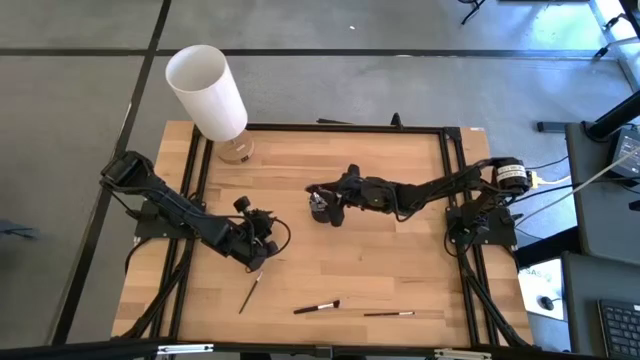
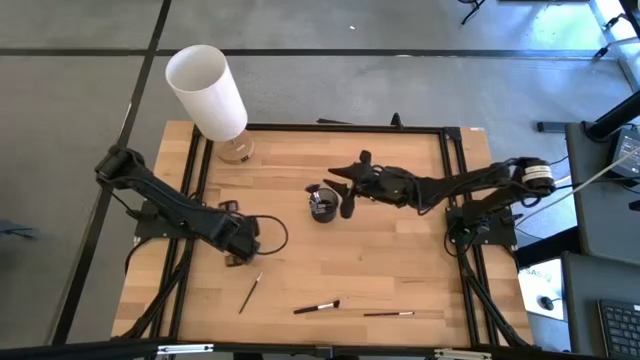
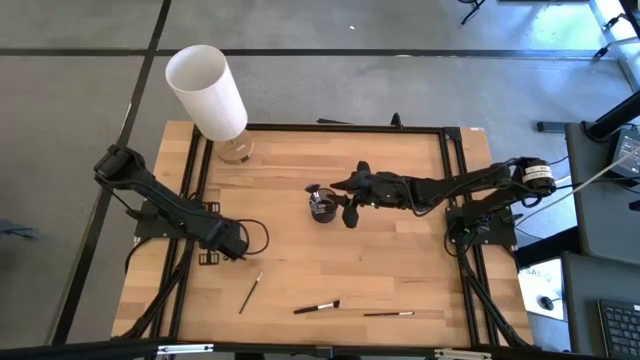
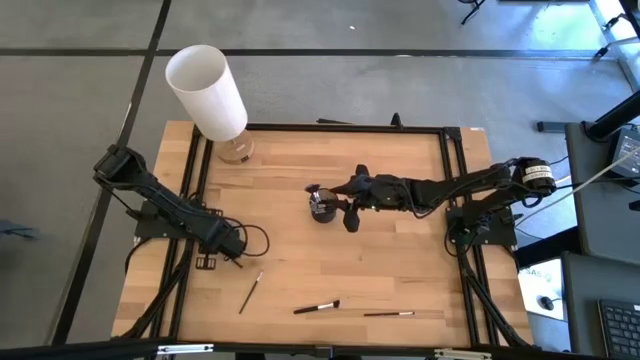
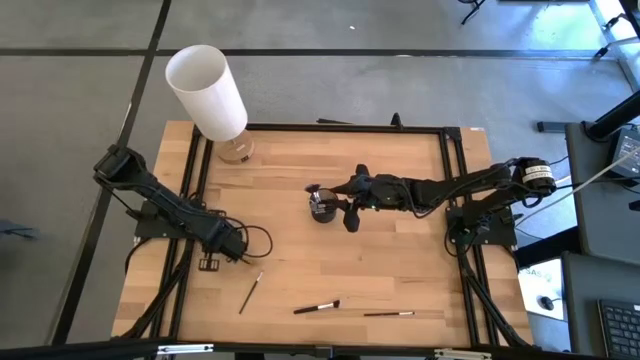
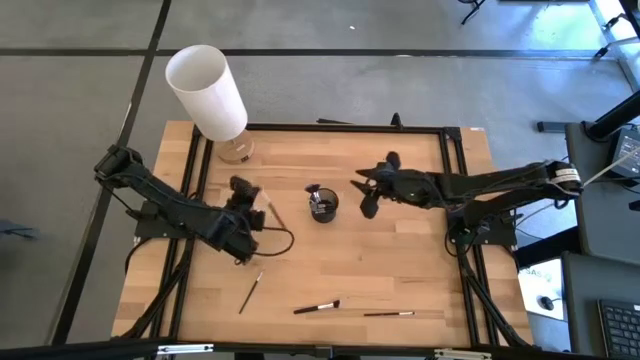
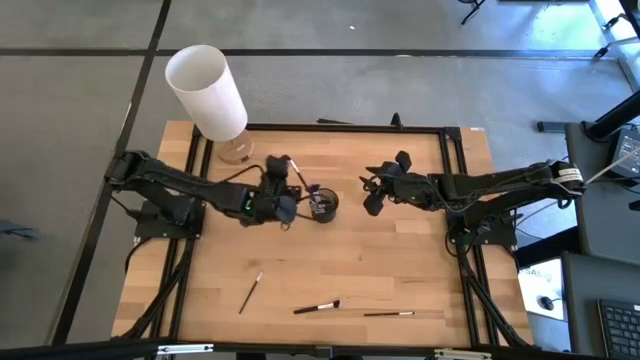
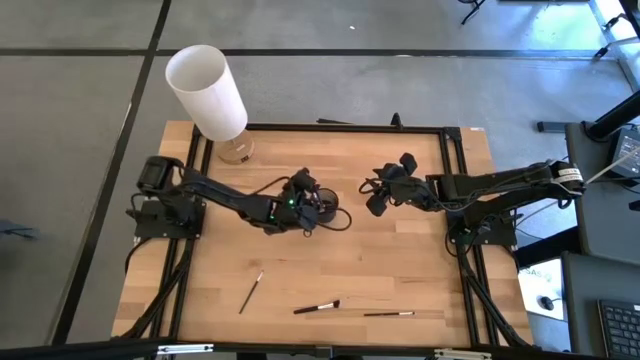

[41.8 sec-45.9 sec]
Task: Pick & Place Makeup Brushes
Put the eyeshadow brush into the makeup brush holder

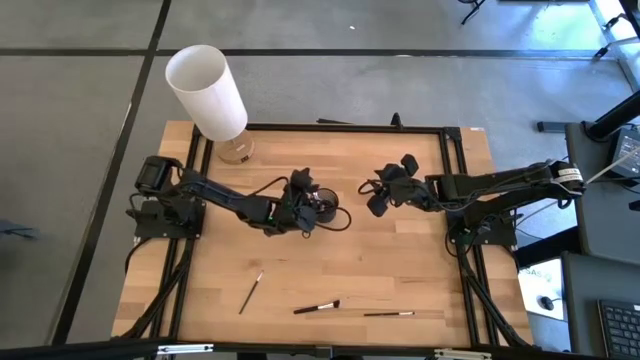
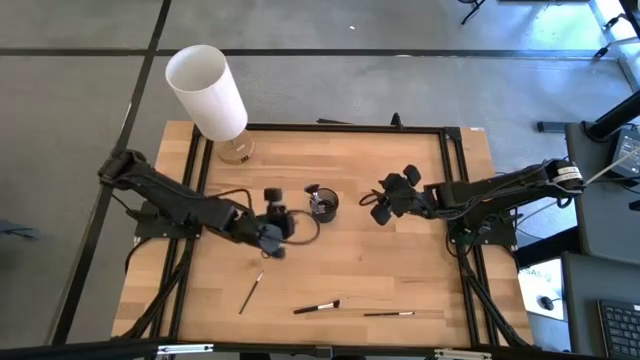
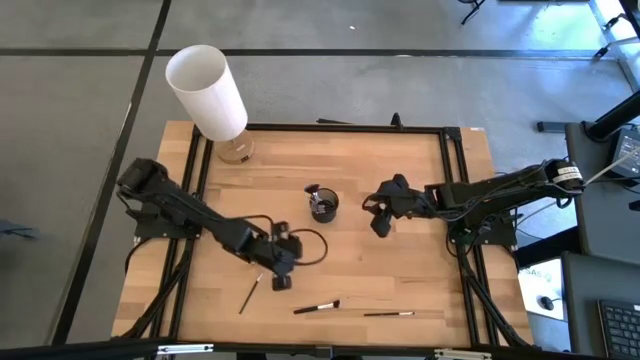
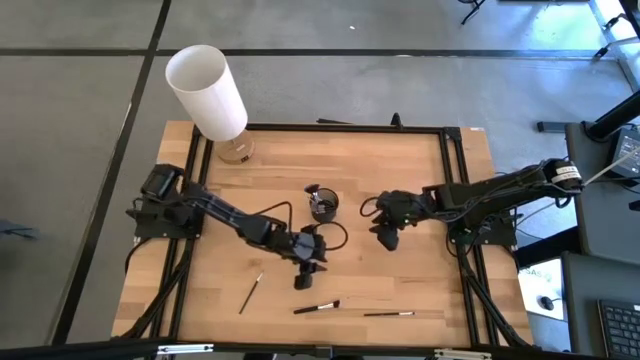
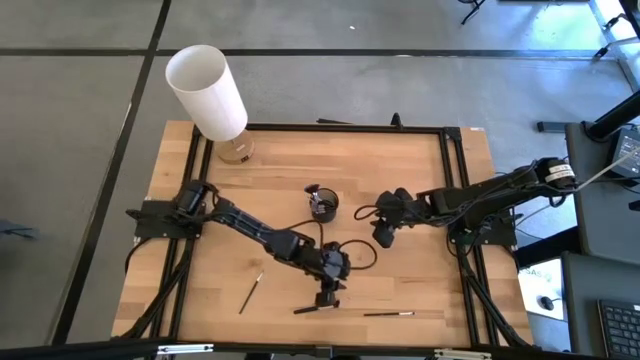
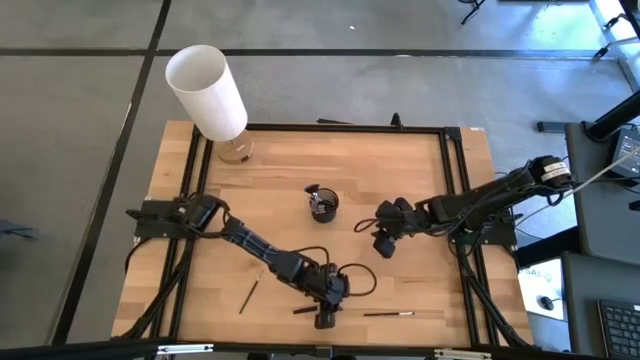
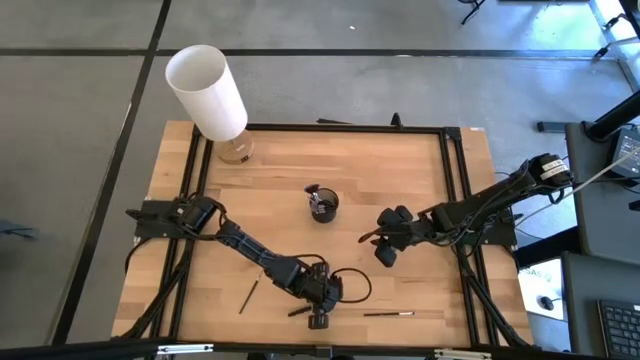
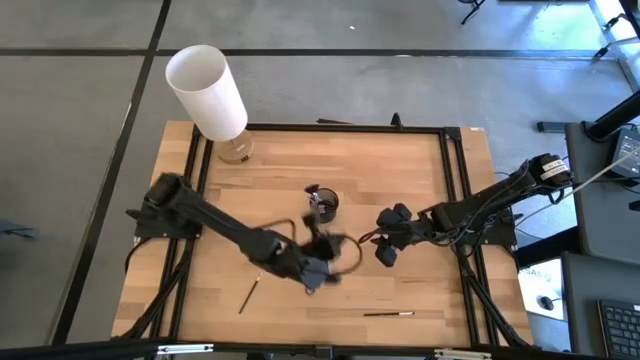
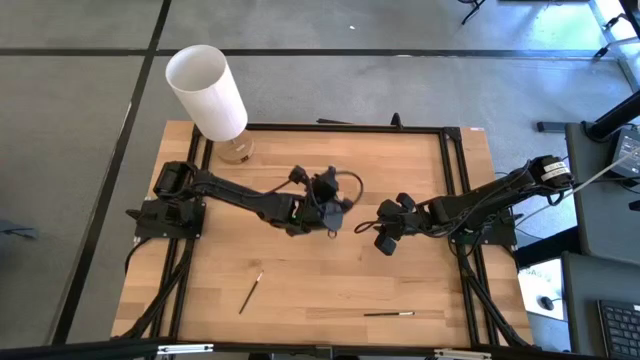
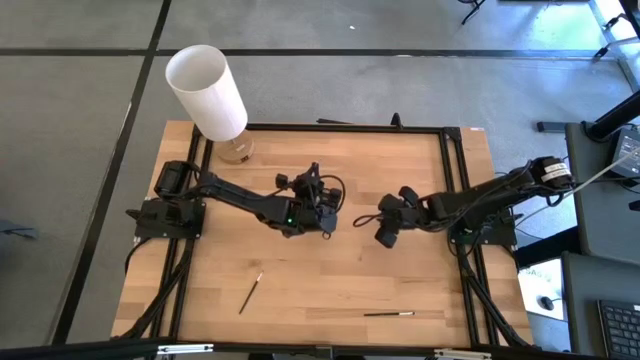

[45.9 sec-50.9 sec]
Put the powder brush into the makeup brush holder

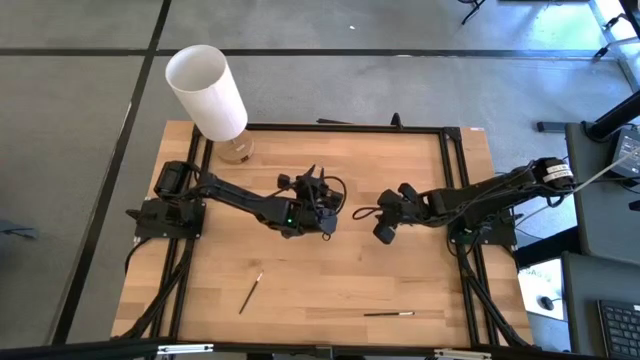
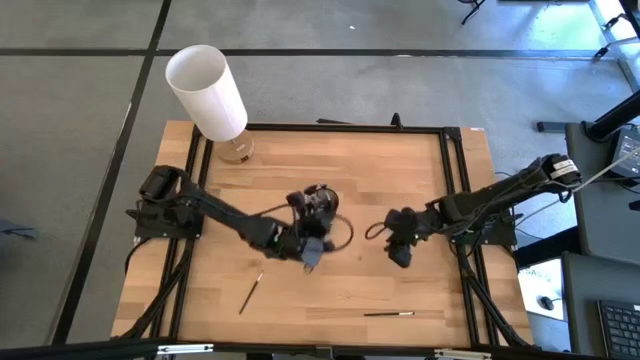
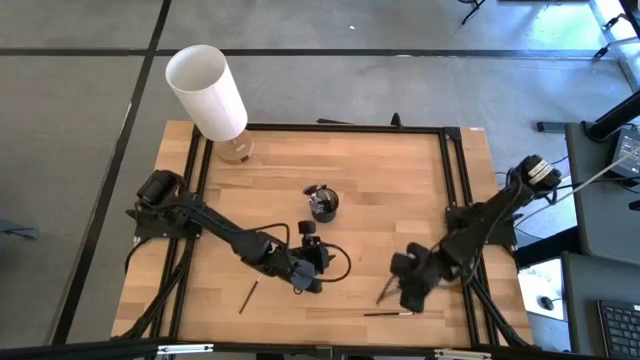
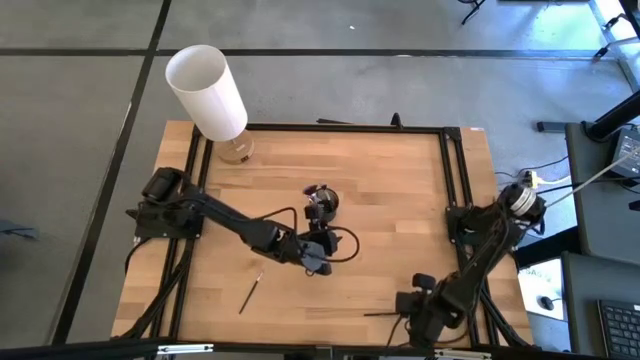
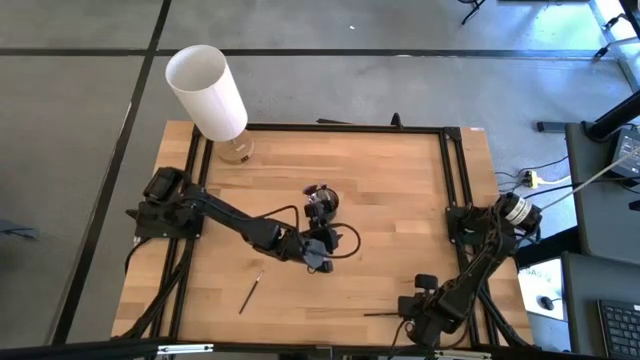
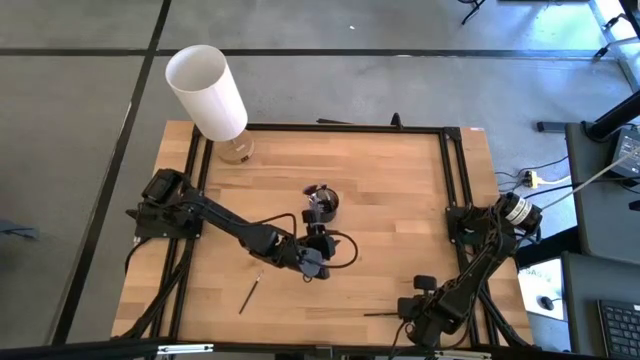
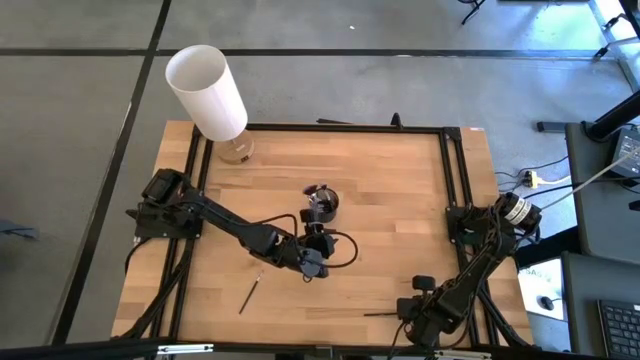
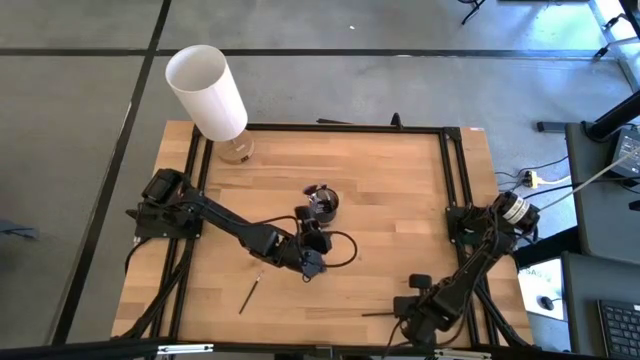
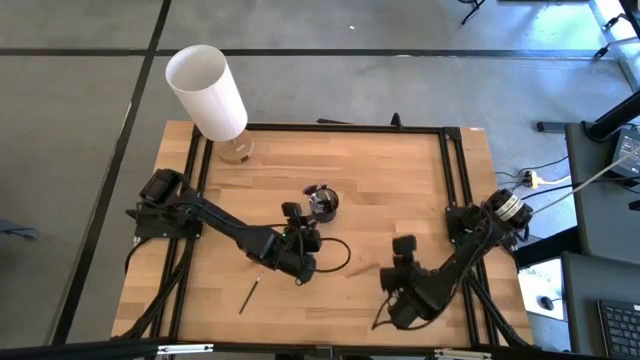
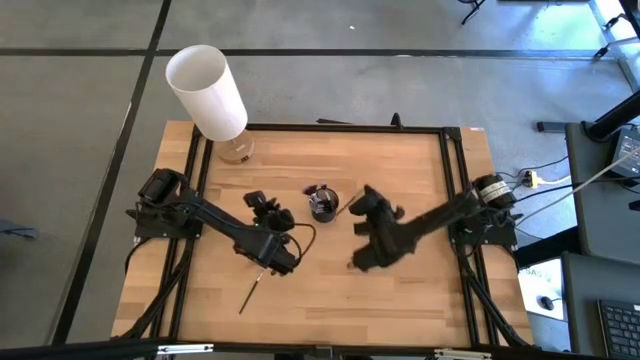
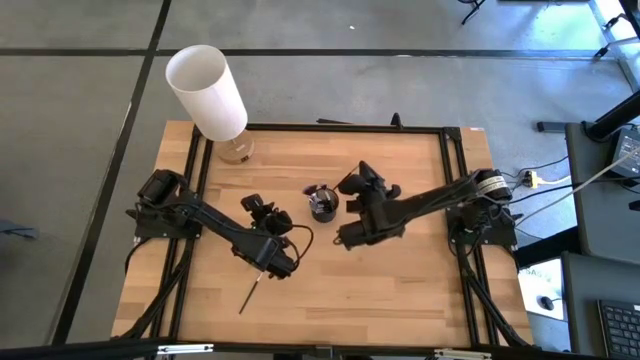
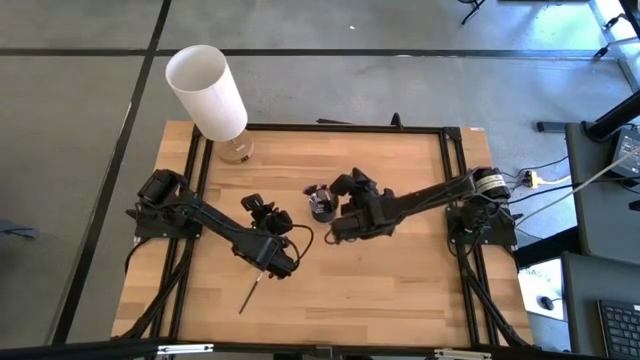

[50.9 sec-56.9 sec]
Put the eyeshadow brush into the makeup brush holder

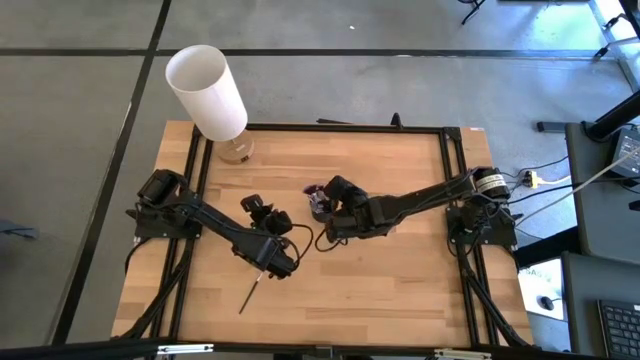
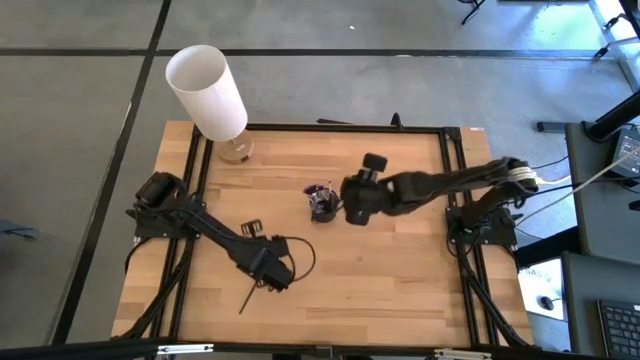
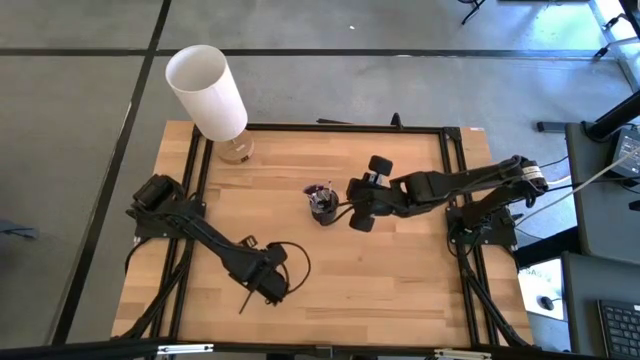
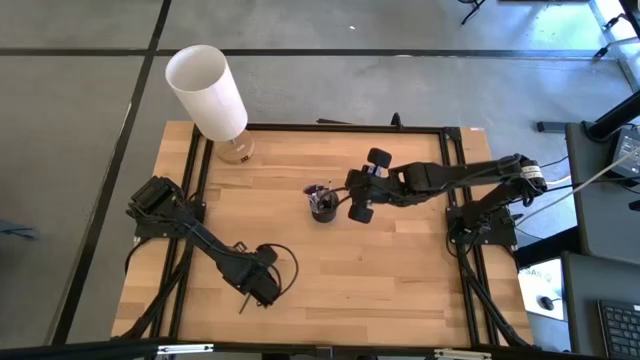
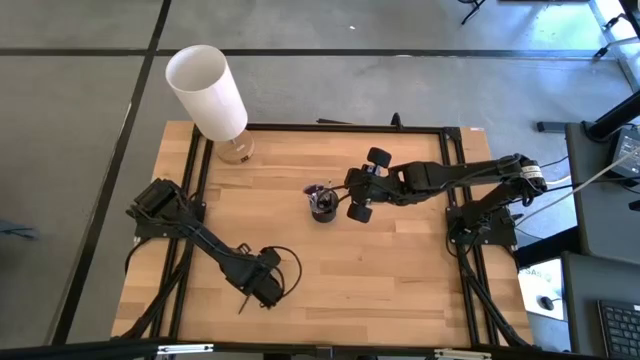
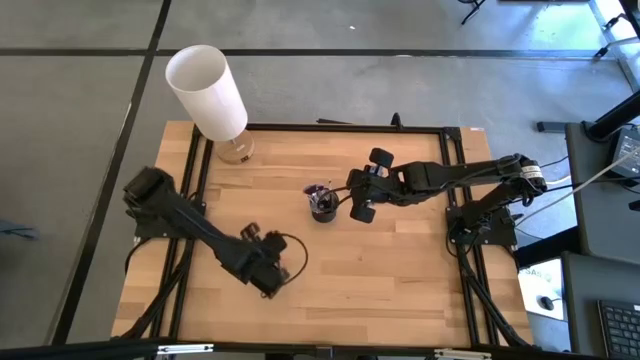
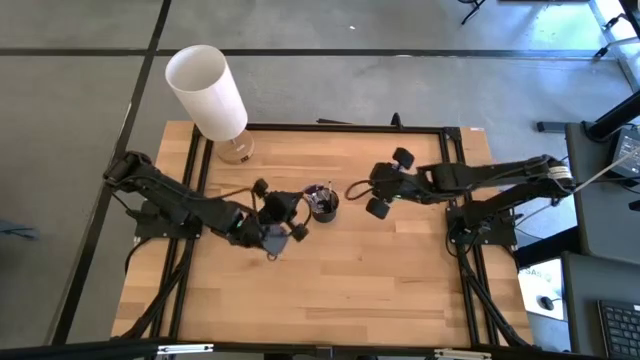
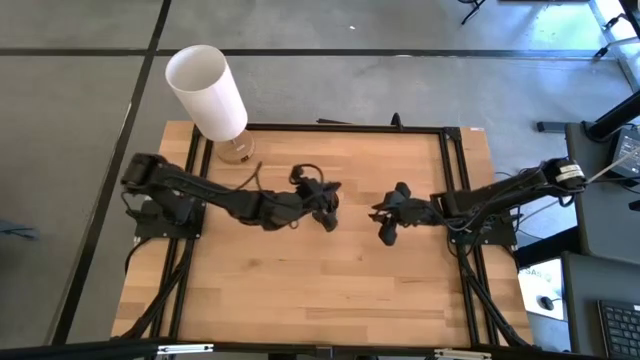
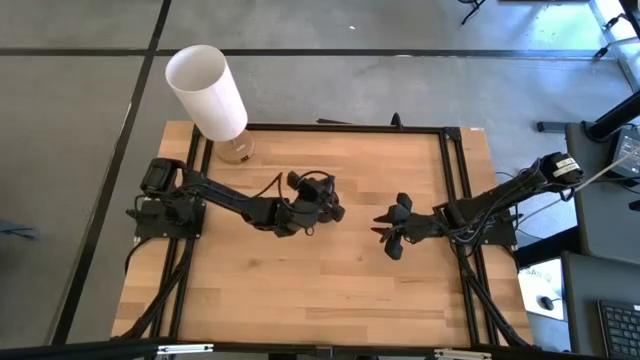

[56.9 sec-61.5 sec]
Put the eyeshadow brush into the makeup brush holder
